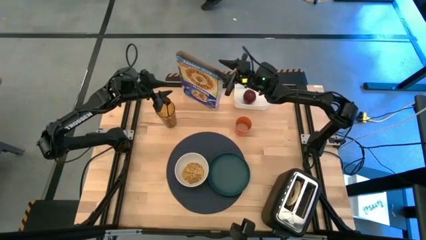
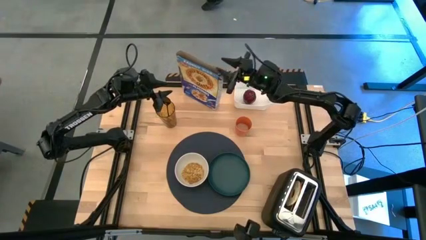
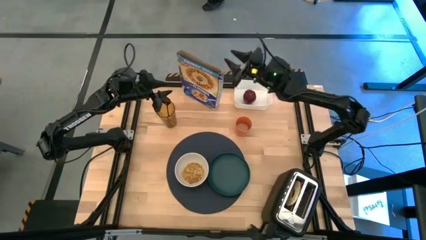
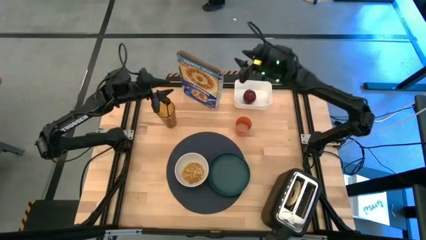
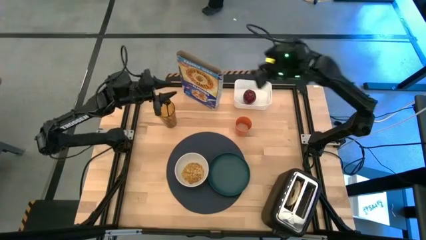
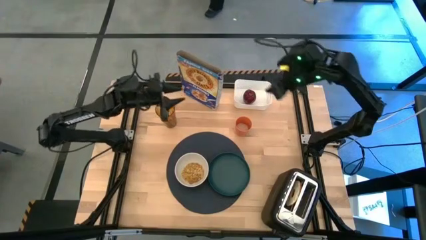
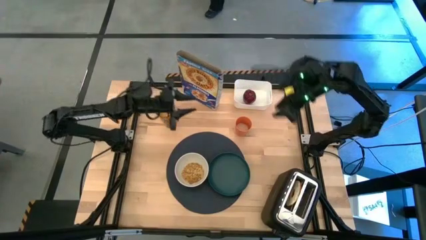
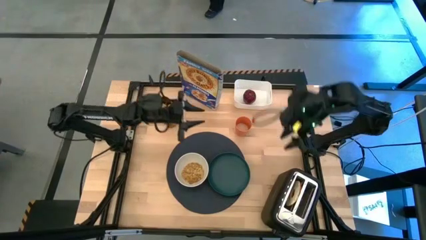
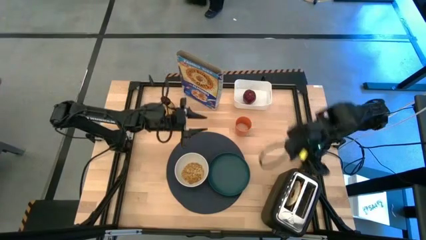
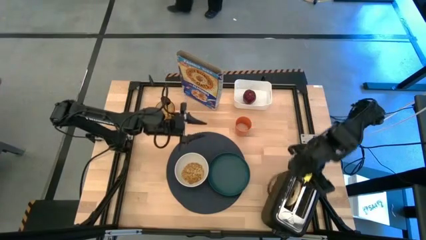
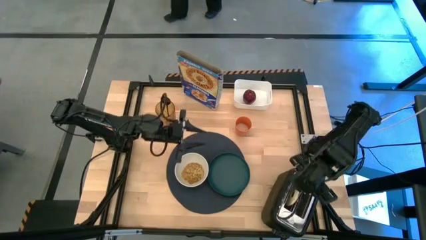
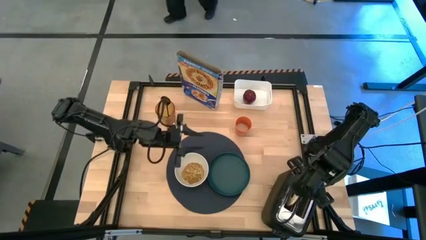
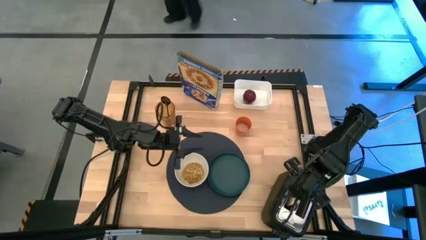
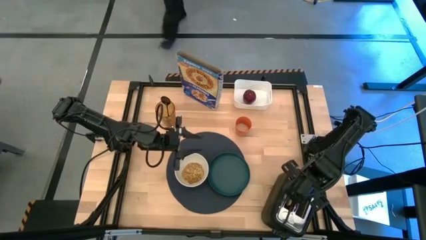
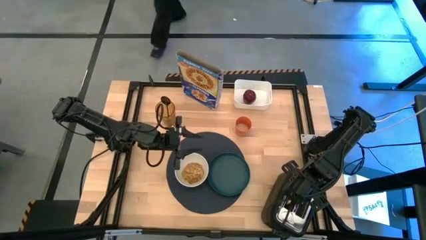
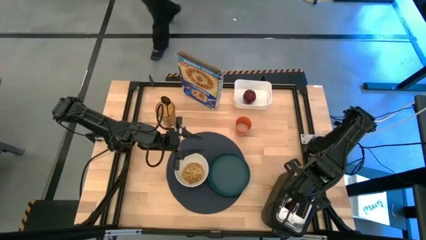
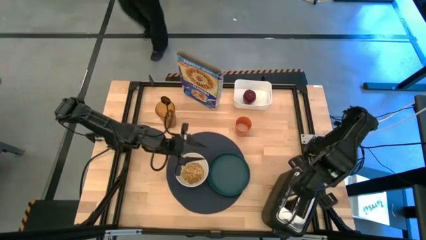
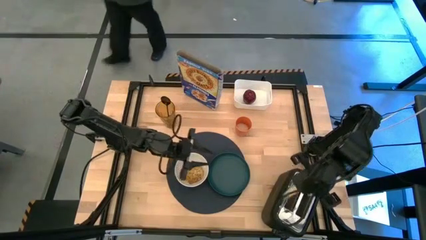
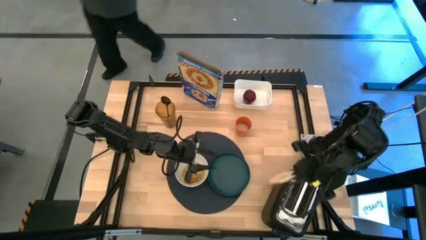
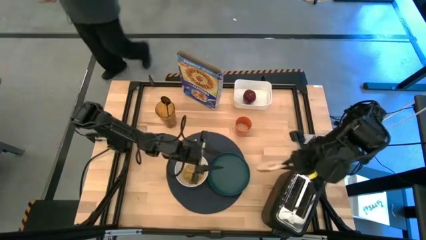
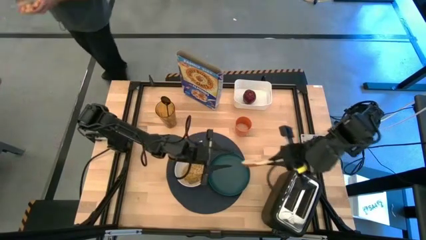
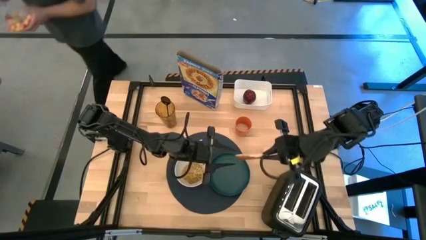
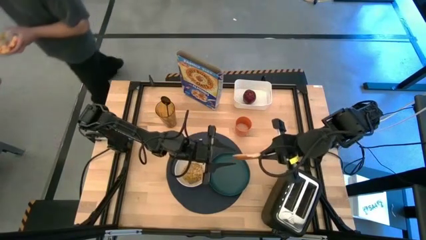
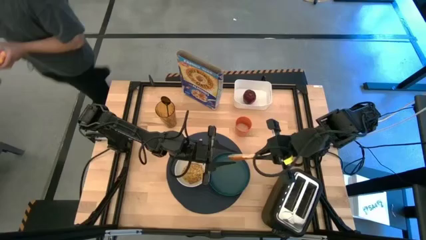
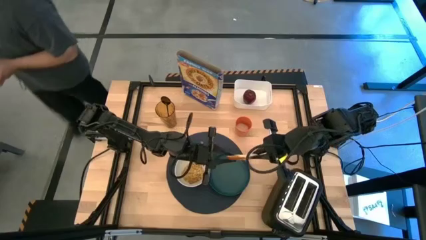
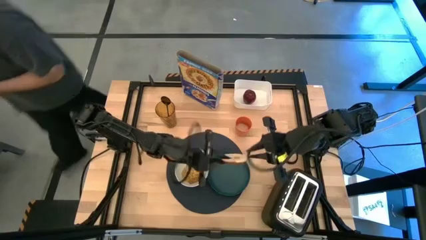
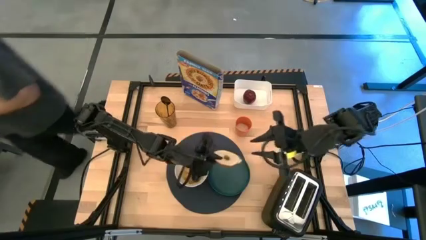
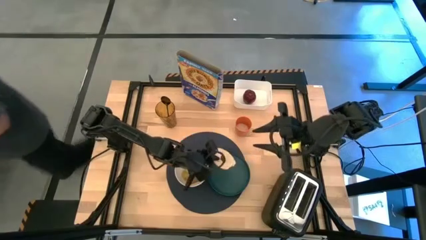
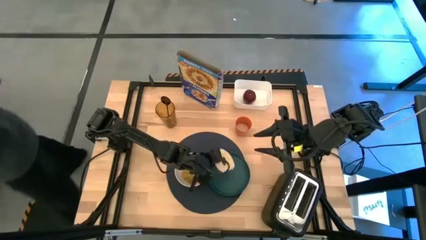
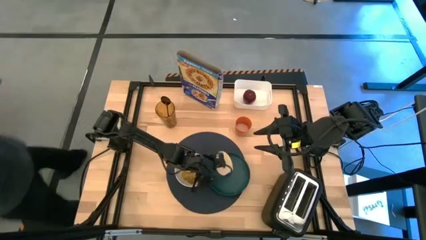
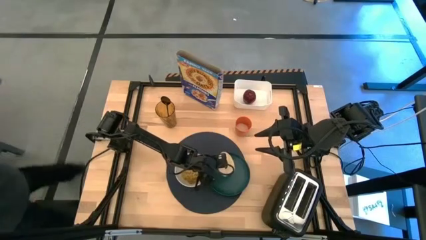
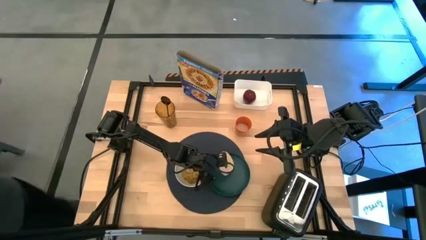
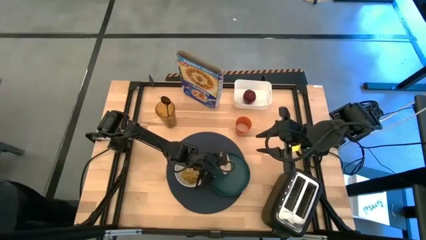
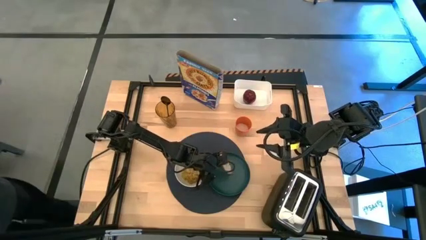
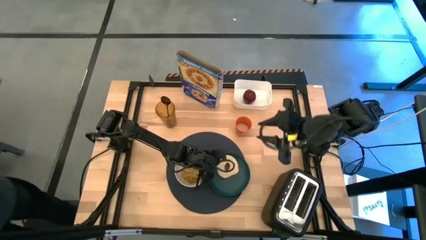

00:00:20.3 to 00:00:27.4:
Task: Arrange a breakfast setting
Put the bagel from the toaster on the green plate

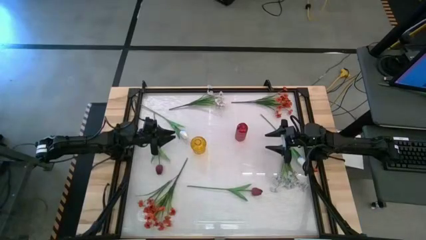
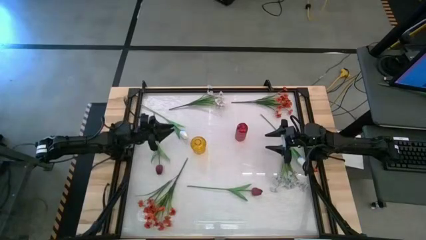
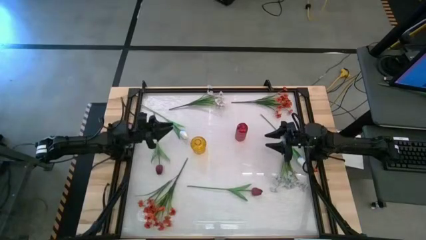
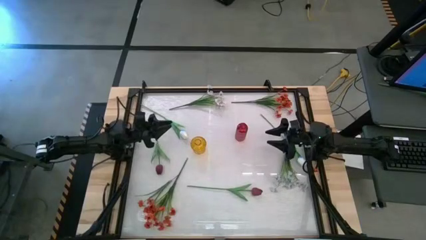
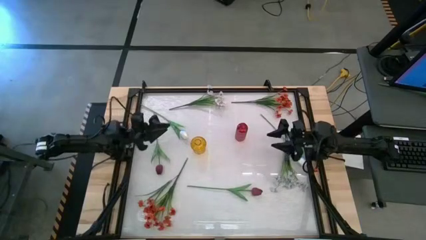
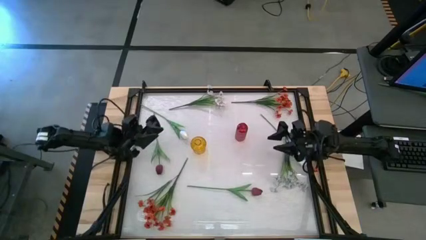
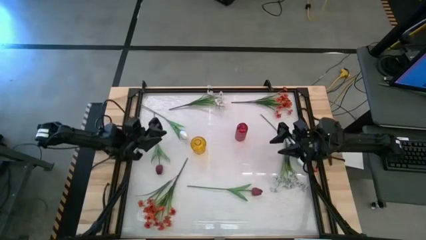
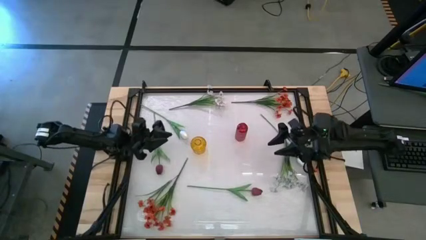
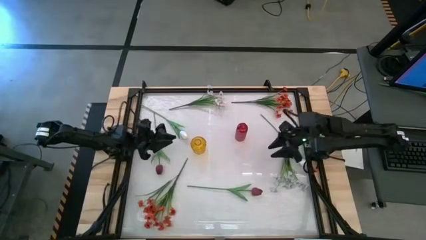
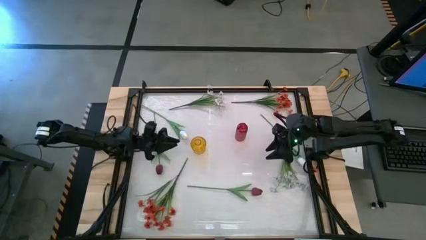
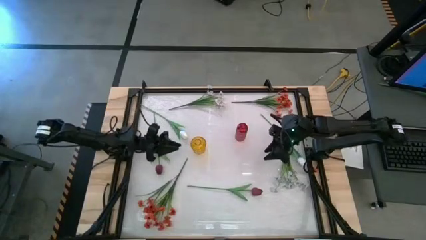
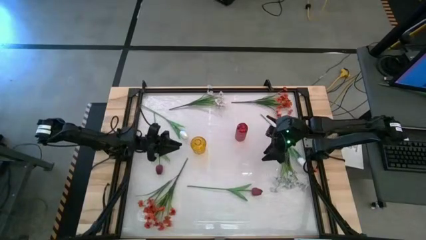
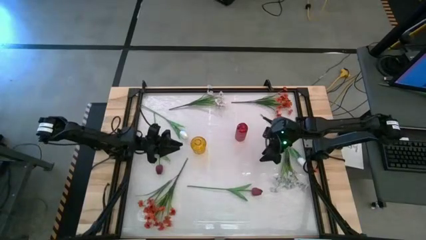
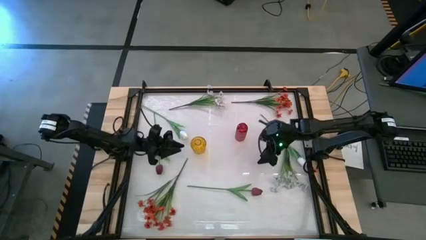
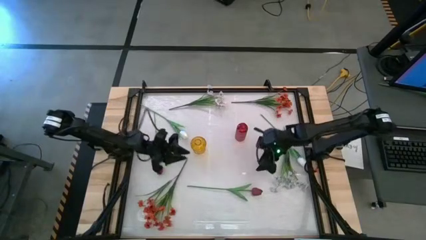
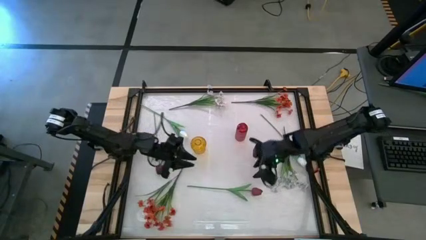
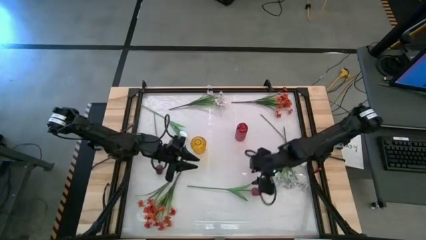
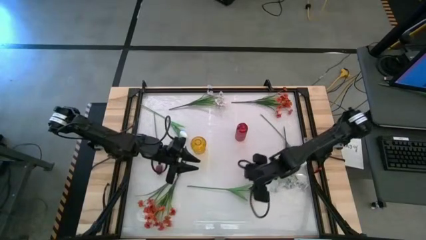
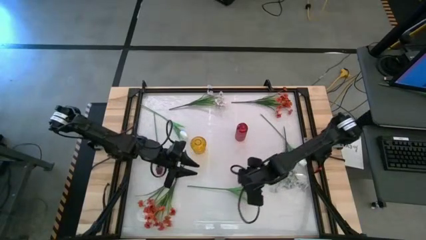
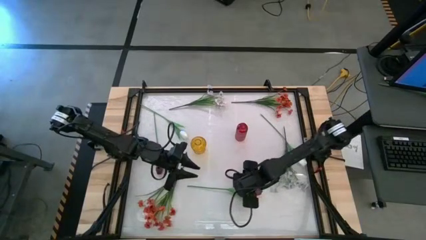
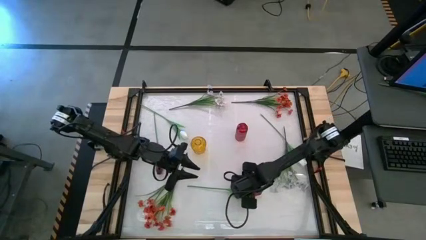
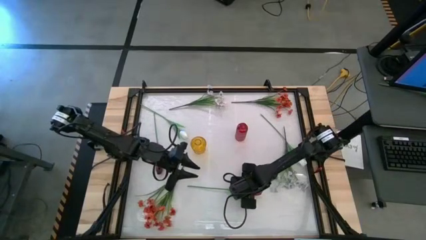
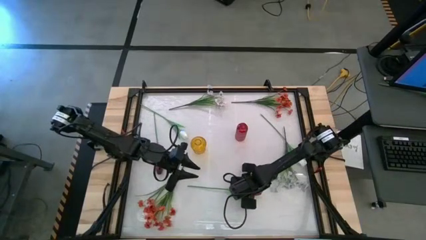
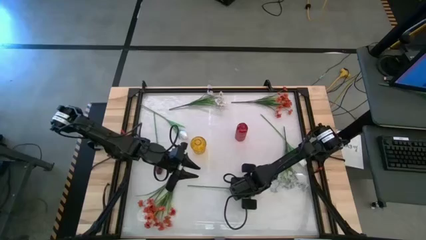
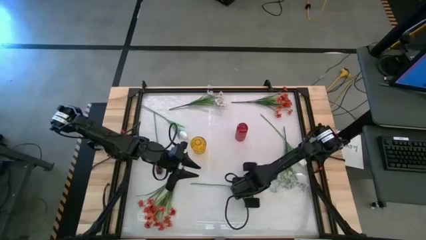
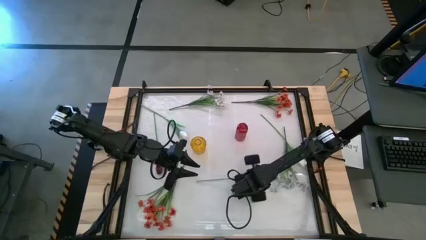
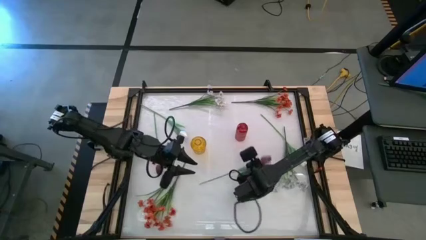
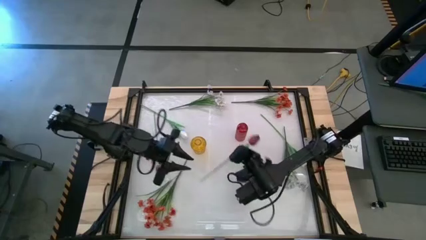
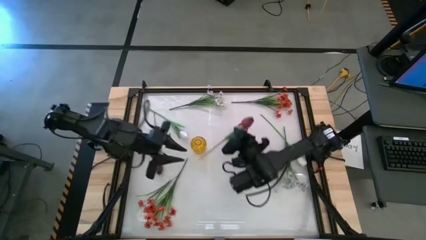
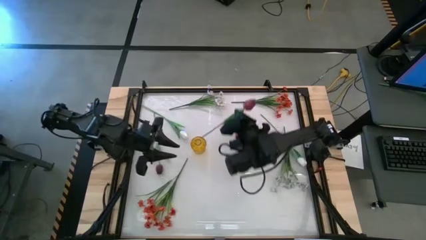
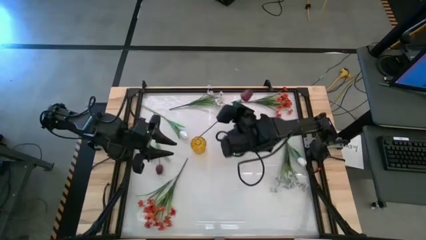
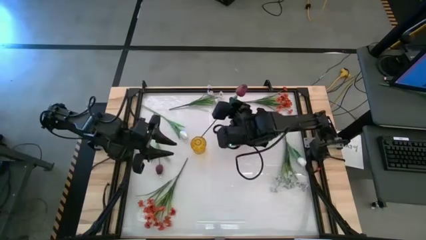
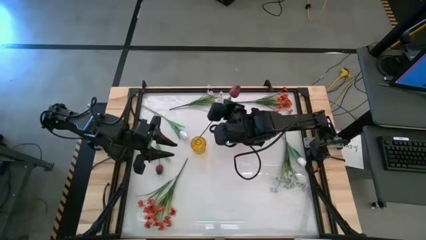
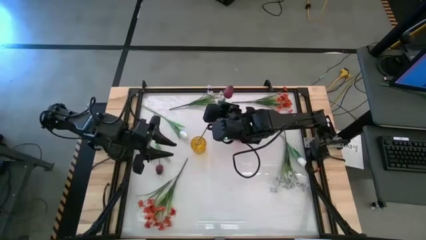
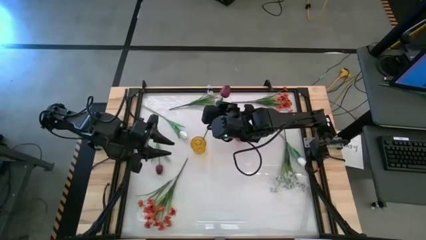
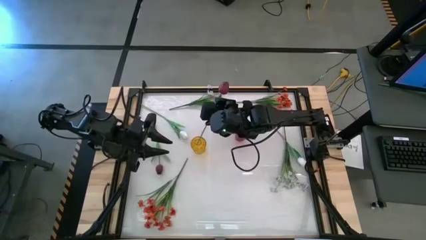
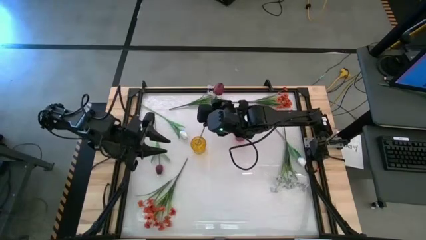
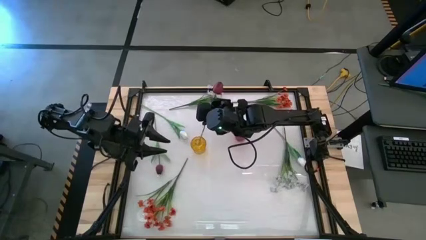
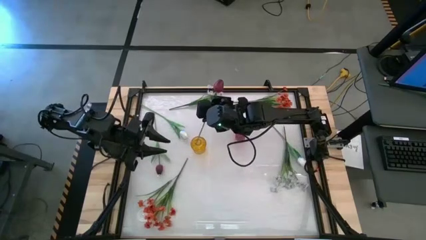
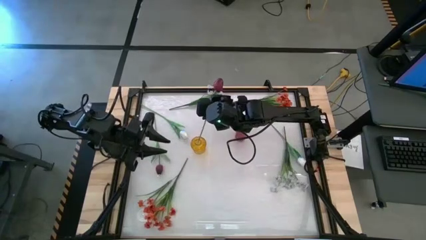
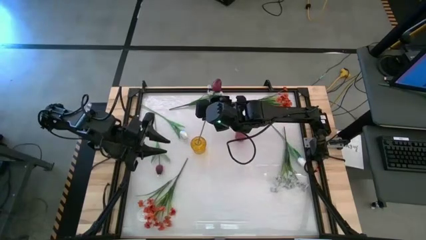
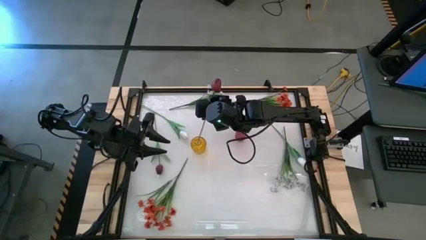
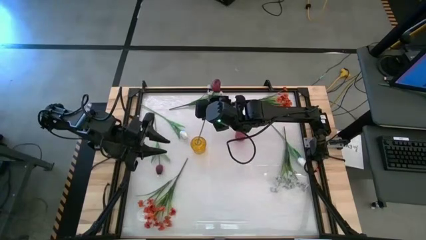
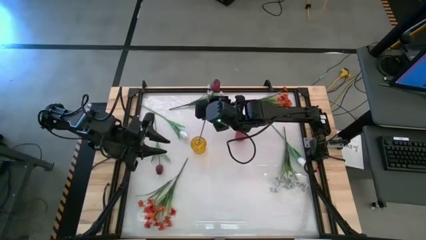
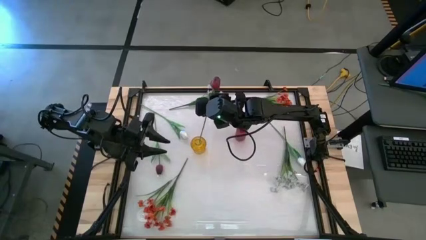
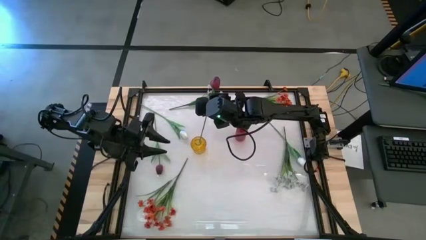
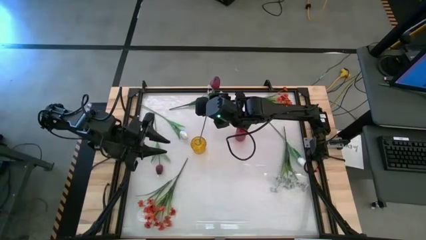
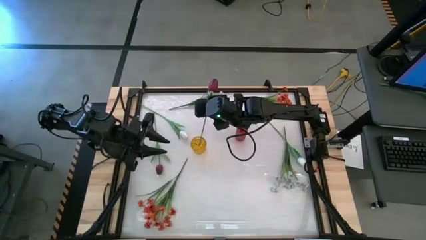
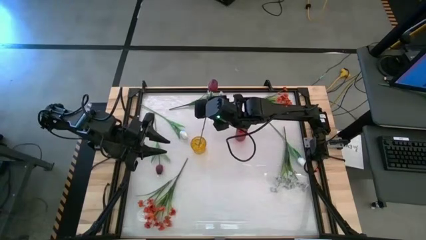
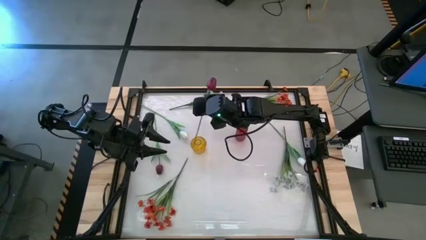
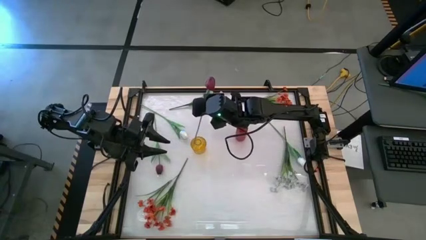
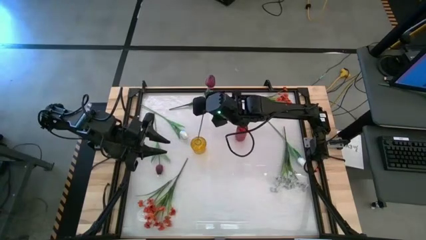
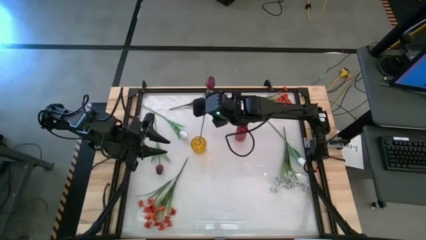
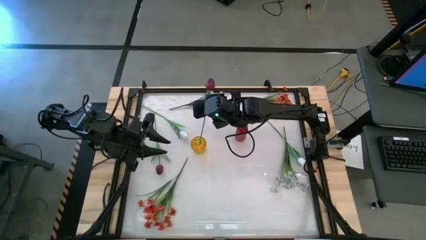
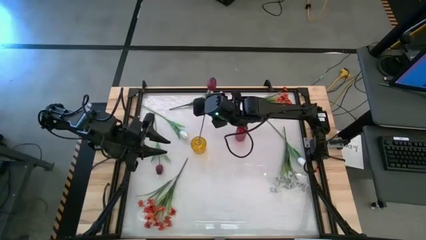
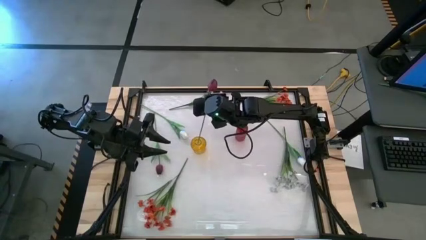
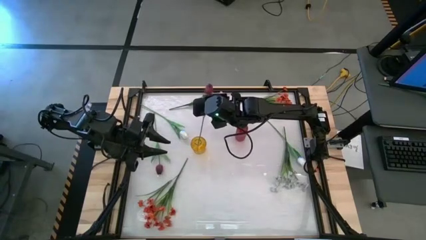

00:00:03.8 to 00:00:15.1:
Task: Sort flowers into vase by color
Put the right red tulip into the yellow flower vase
